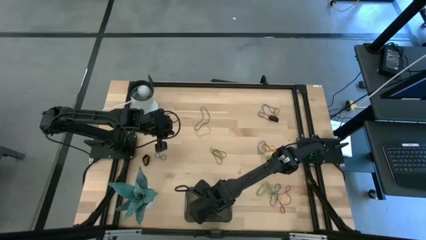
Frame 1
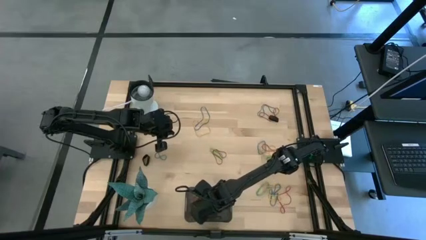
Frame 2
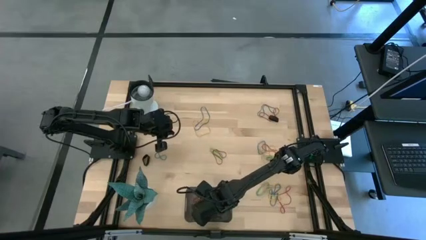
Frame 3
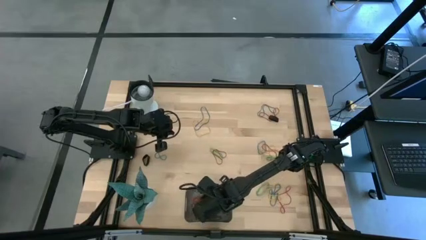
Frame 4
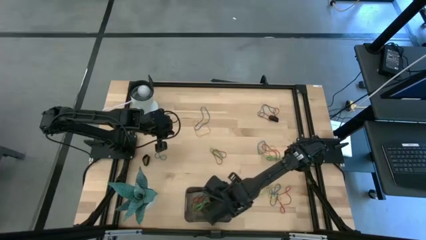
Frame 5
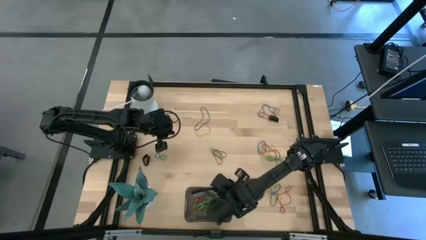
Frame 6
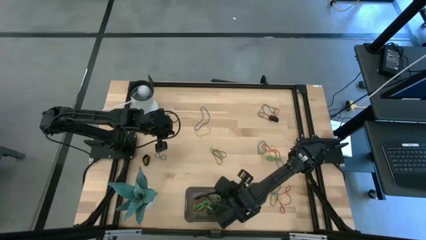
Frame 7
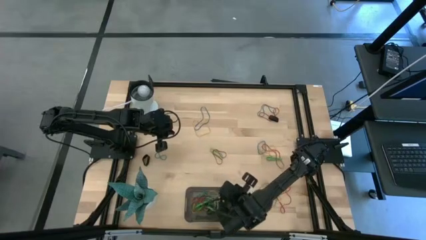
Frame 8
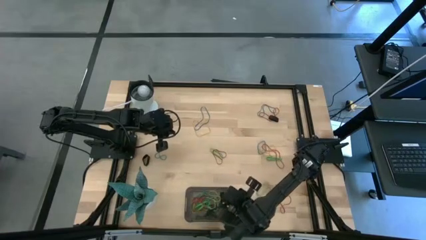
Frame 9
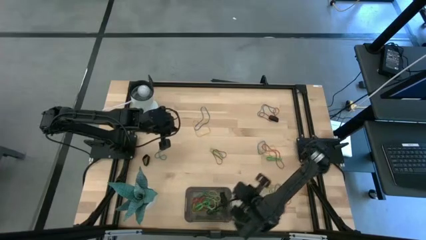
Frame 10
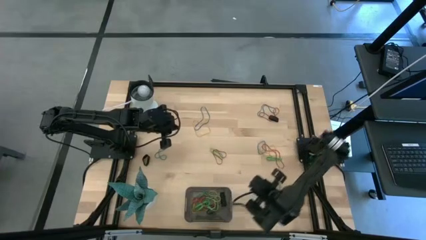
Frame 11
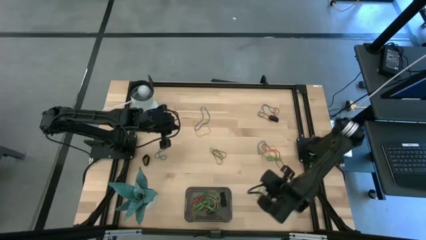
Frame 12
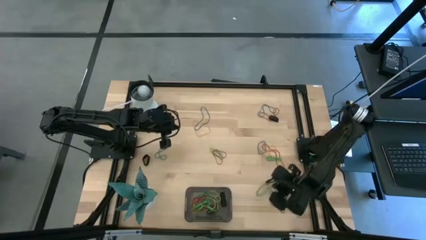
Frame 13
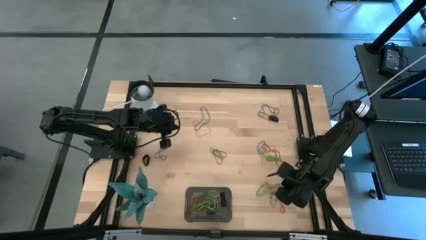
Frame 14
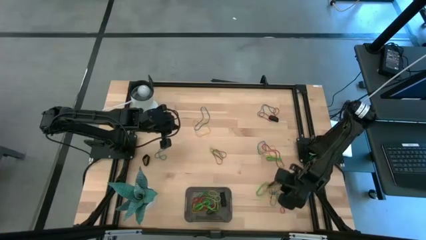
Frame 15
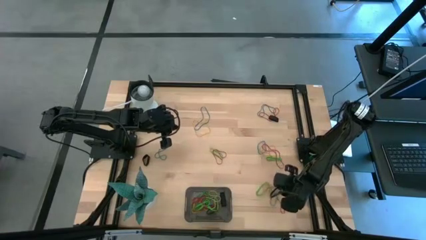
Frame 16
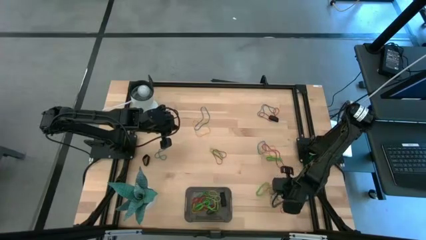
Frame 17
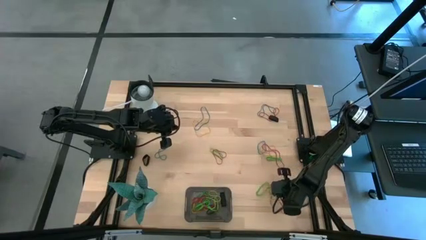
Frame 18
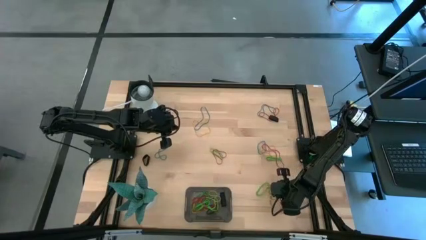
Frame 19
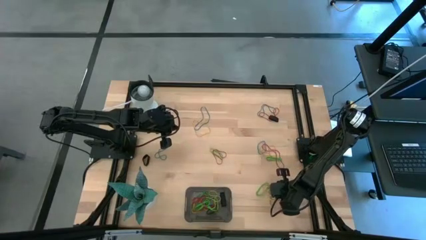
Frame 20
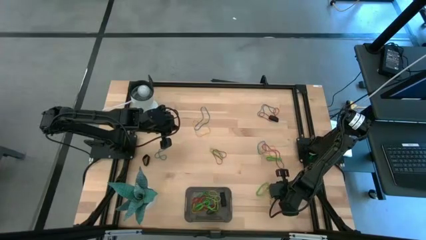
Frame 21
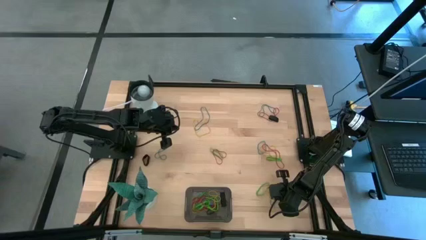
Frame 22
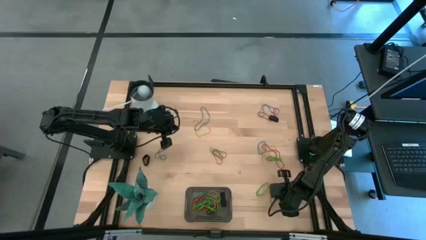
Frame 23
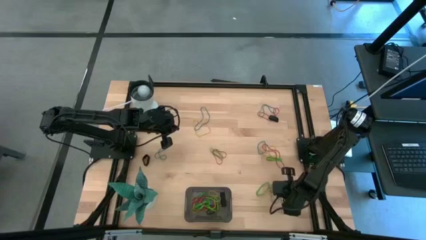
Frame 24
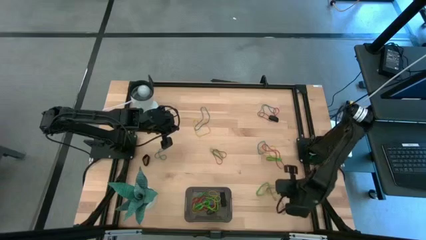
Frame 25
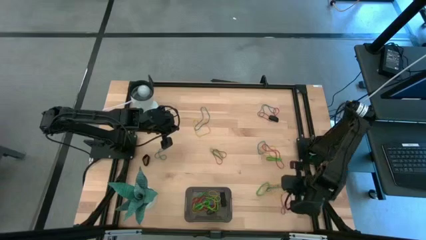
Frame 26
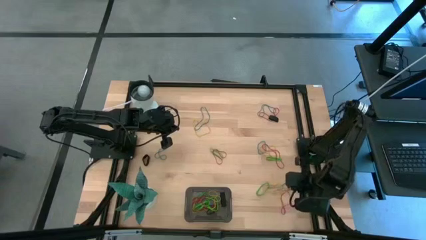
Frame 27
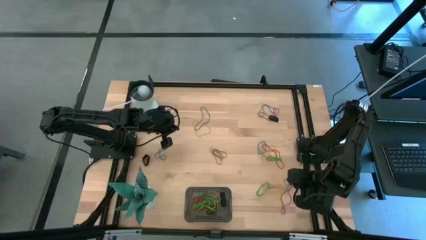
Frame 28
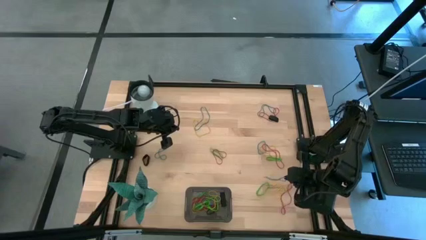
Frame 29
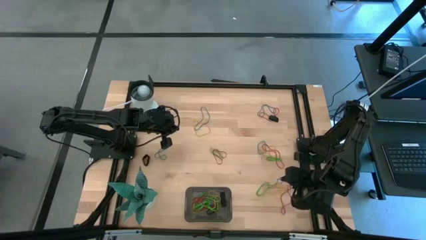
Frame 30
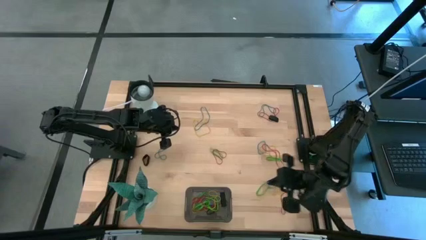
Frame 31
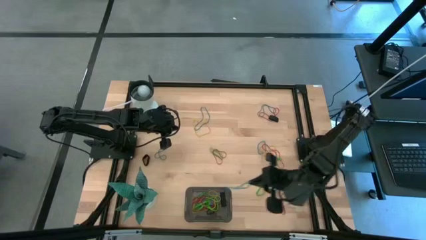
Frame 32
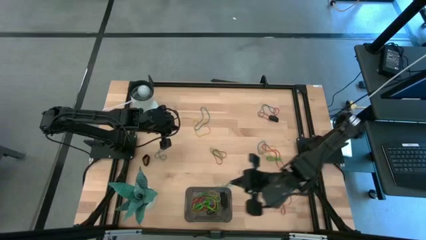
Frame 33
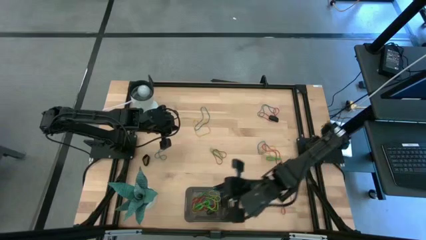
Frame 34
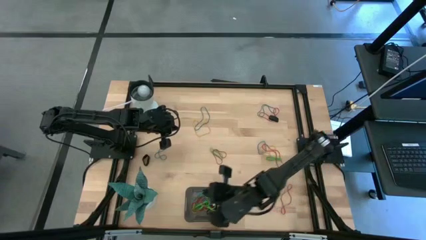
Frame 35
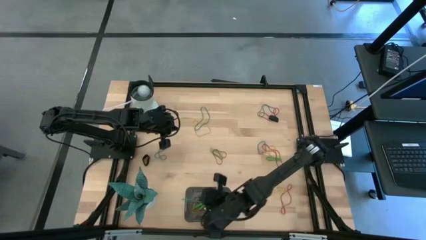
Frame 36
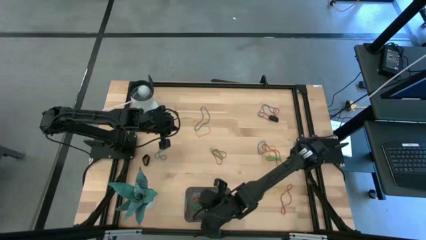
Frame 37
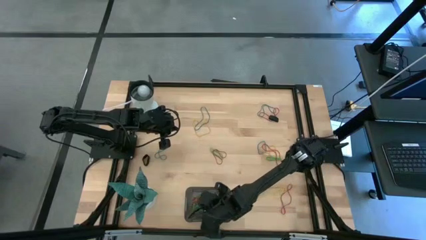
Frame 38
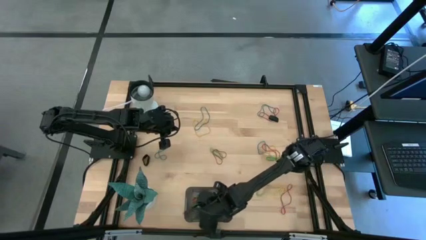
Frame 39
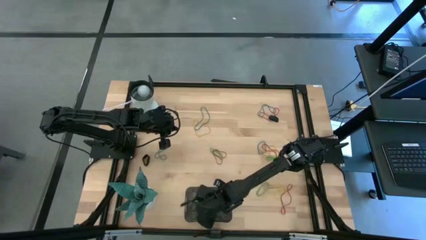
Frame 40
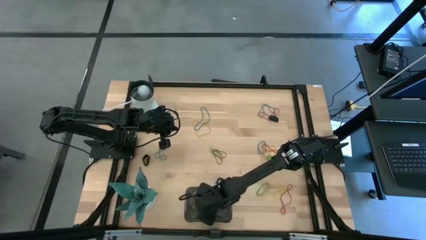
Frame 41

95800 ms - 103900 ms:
Task: Pick and place rubber bands into bin
Put the blue rubber band into the black bin

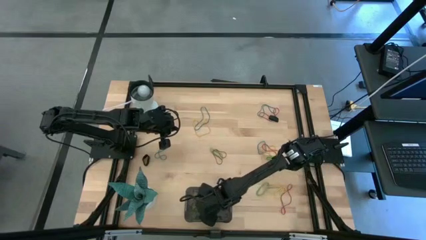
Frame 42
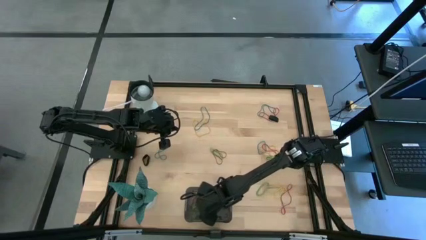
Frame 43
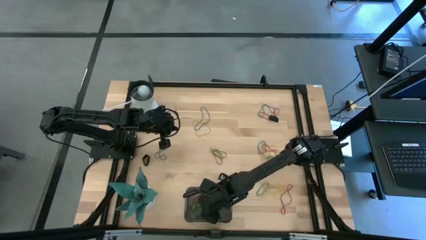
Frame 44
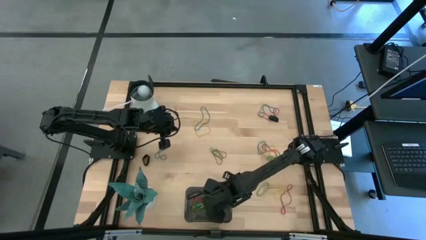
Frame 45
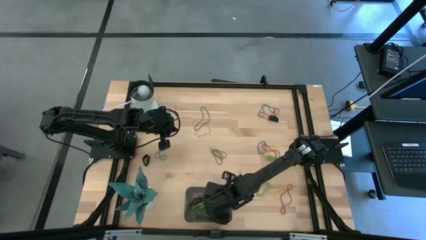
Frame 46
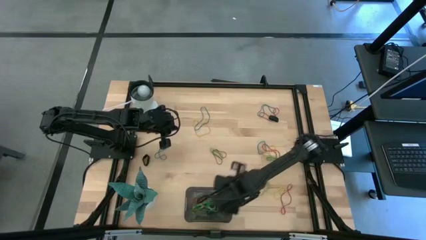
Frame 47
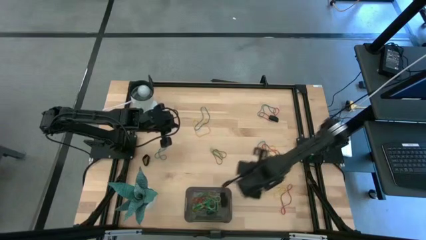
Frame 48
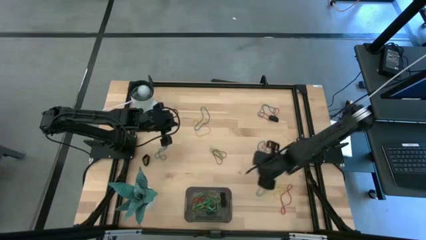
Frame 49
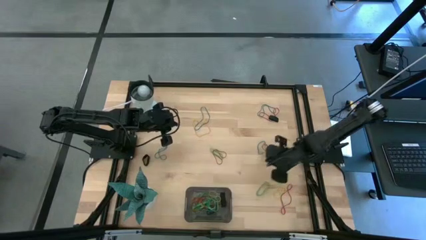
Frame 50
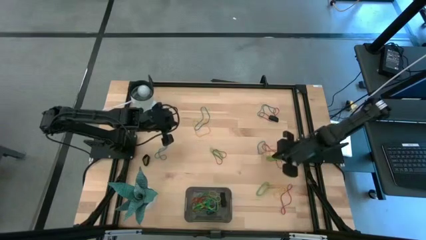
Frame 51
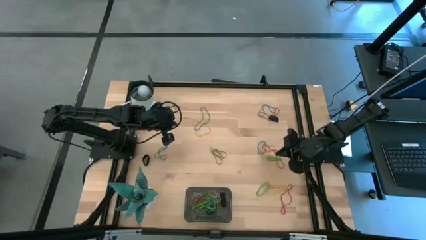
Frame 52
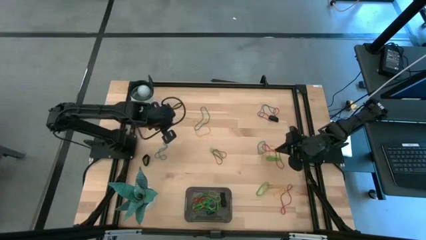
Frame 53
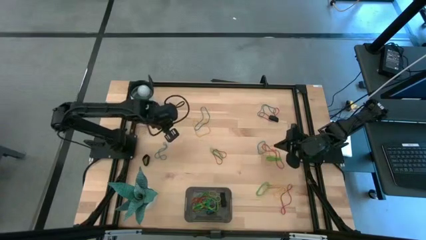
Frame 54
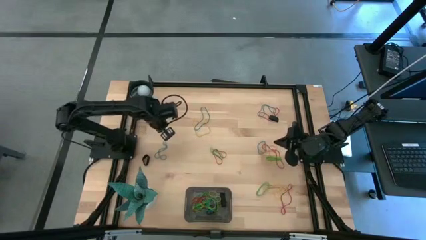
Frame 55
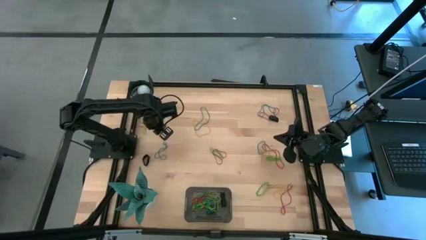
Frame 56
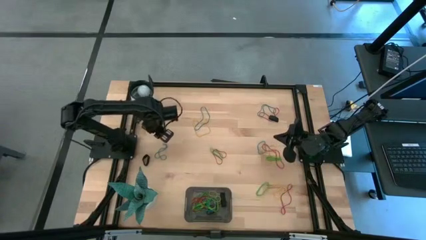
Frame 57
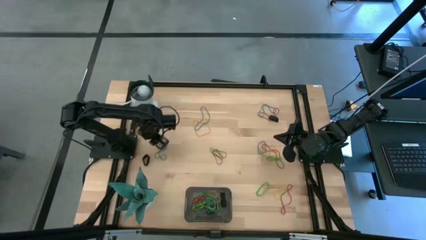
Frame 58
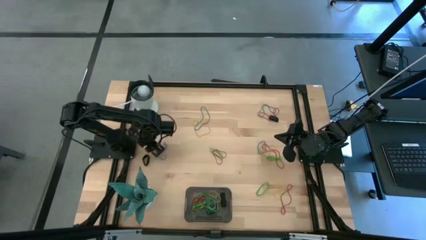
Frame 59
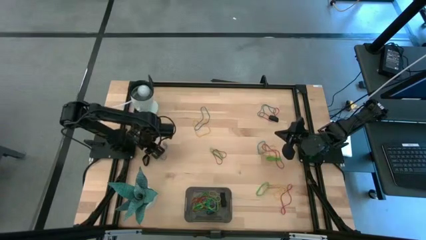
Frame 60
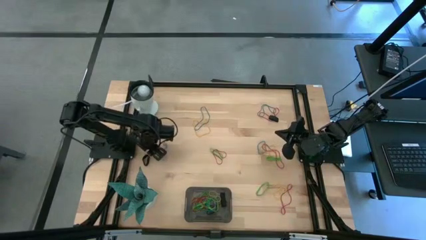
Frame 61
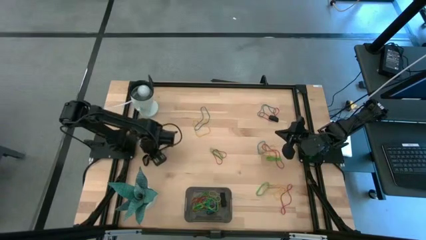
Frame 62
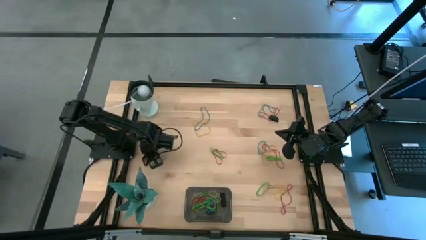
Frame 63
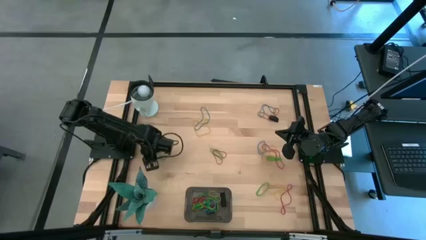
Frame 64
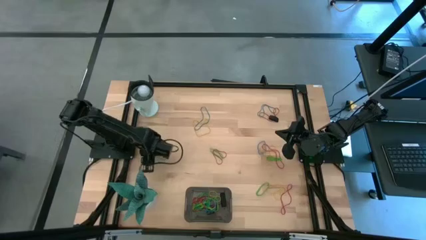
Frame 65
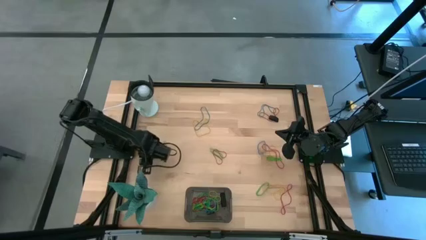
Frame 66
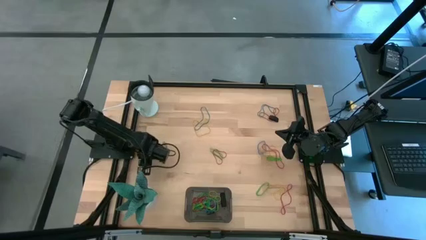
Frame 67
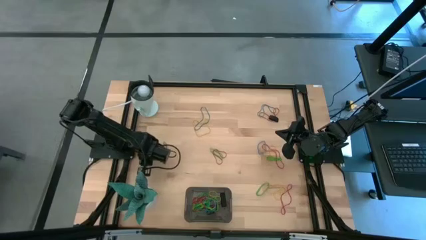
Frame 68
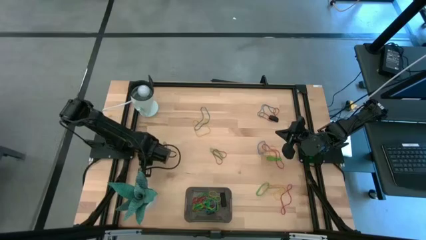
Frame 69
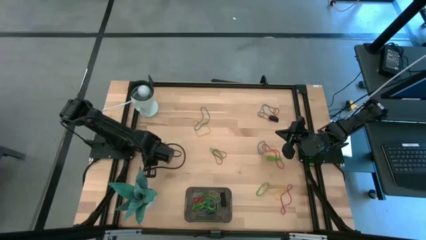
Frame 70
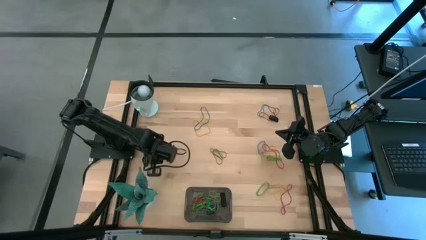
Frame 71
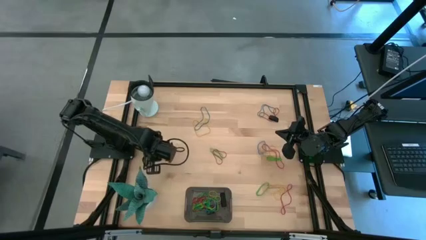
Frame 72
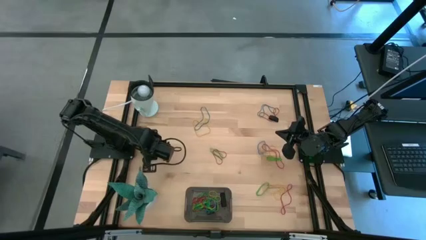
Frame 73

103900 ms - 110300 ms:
Put the black rubber band into the black bin

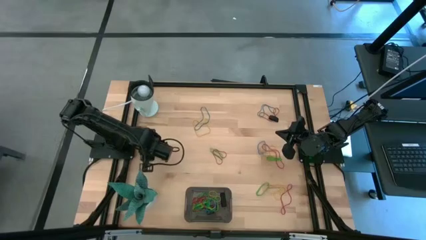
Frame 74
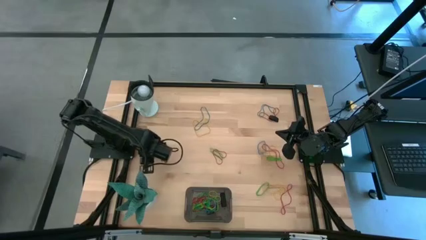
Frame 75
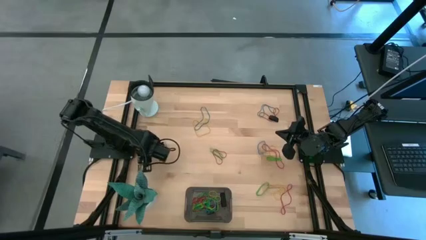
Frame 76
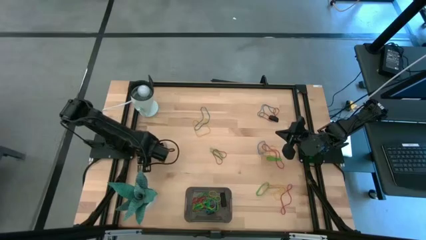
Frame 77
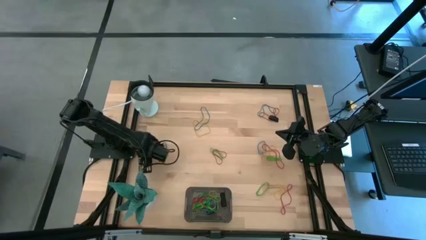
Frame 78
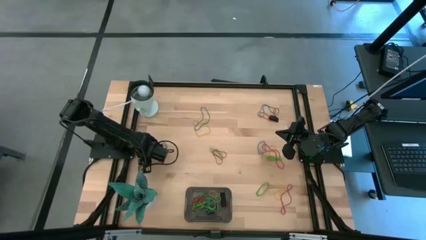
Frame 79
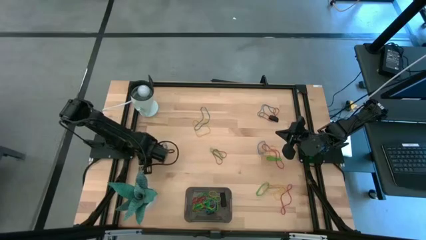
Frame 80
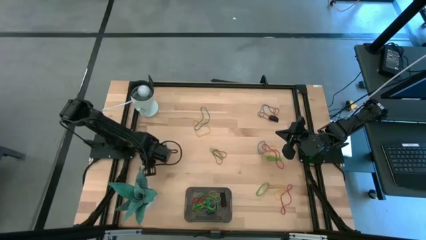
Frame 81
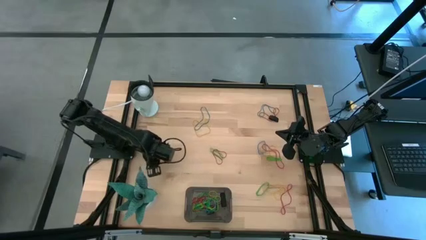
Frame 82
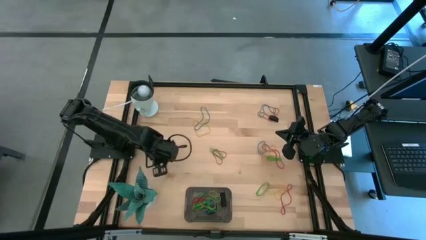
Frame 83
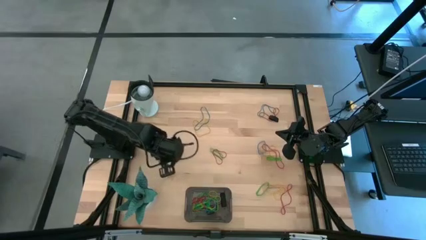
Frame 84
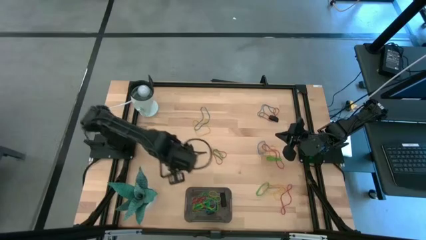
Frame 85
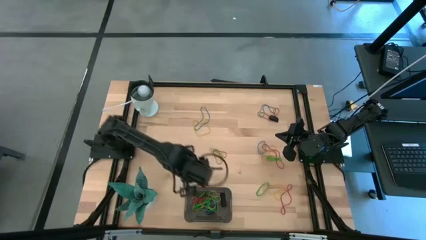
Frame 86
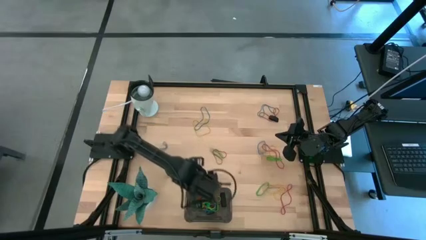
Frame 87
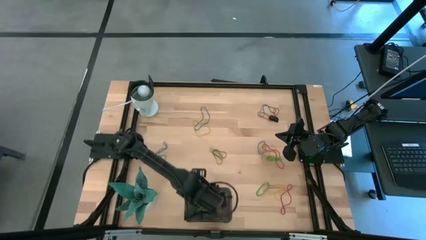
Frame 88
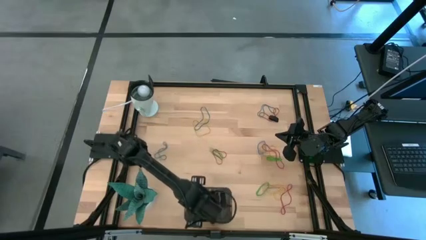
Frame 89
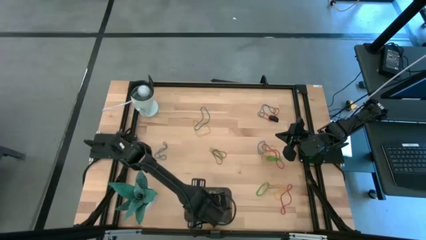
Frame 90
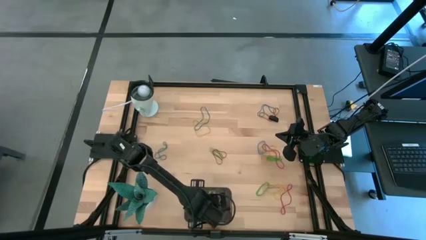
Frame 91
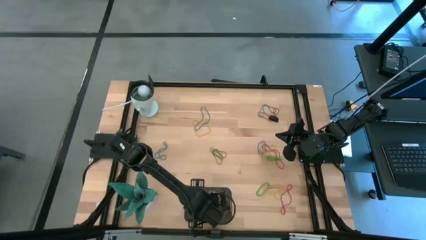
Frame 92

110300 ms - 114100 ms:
Put the black rubber band into the black bin
